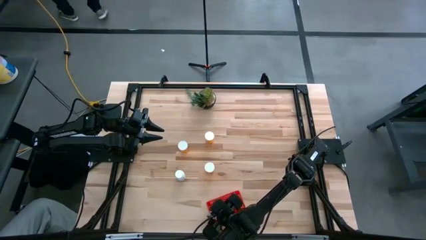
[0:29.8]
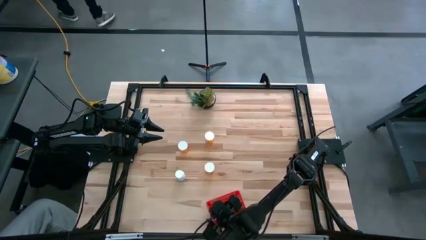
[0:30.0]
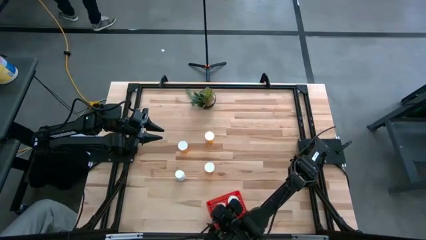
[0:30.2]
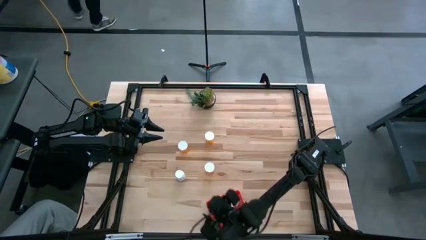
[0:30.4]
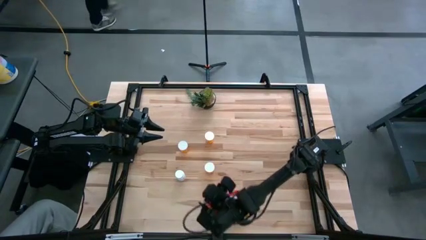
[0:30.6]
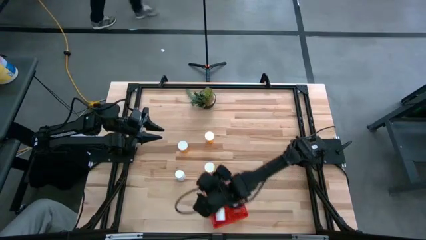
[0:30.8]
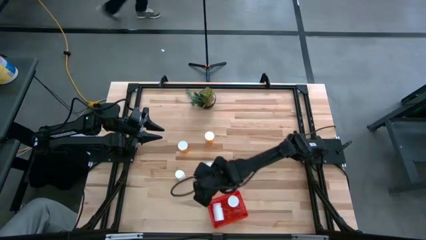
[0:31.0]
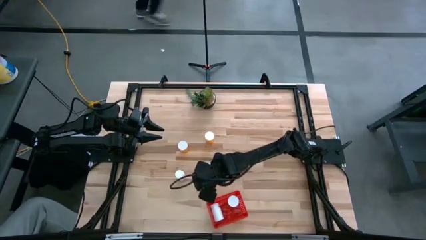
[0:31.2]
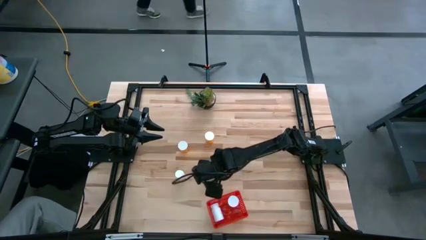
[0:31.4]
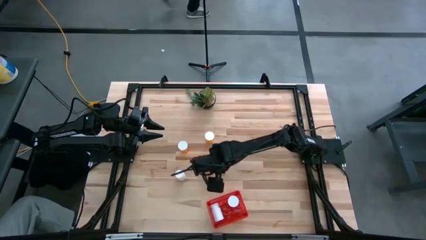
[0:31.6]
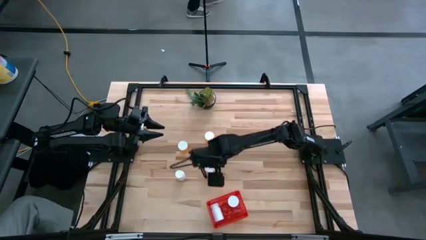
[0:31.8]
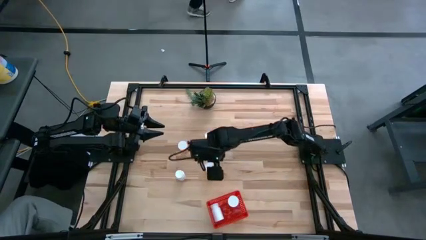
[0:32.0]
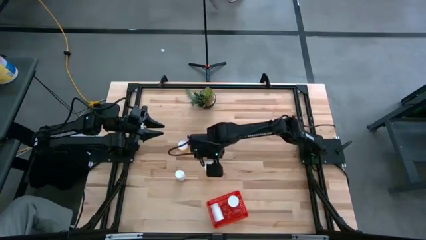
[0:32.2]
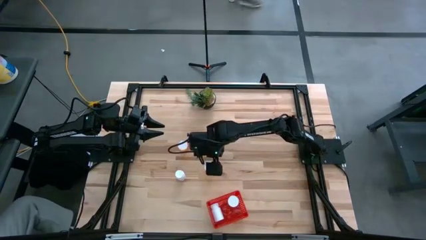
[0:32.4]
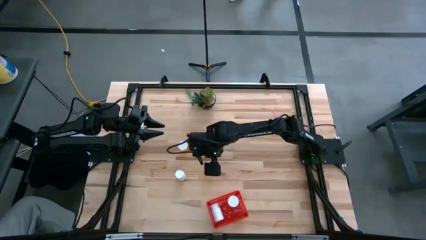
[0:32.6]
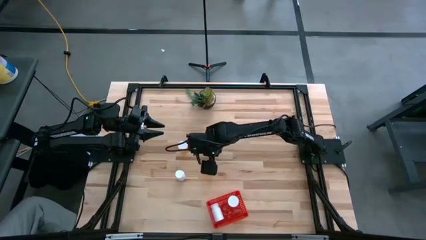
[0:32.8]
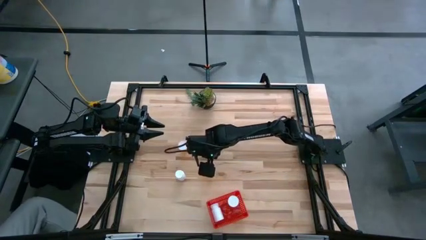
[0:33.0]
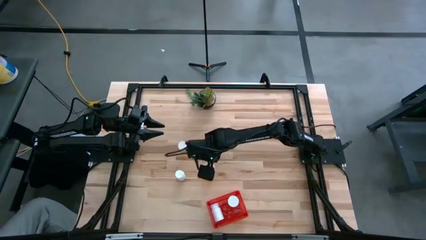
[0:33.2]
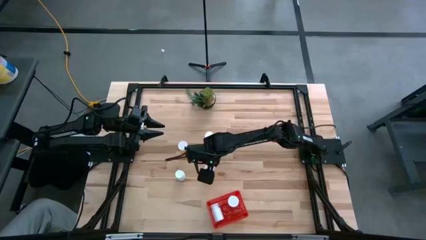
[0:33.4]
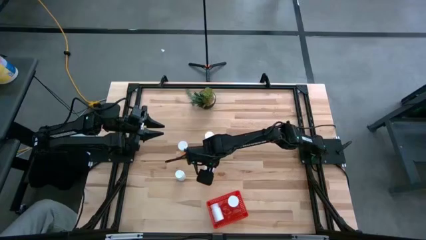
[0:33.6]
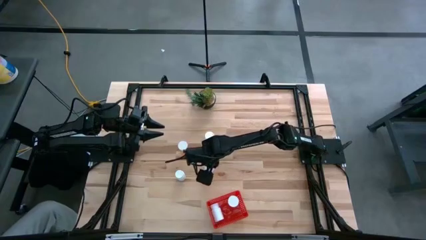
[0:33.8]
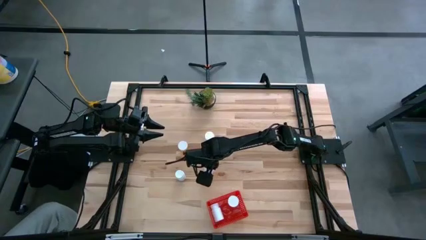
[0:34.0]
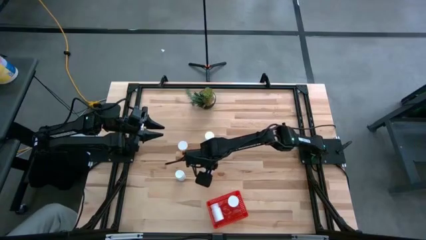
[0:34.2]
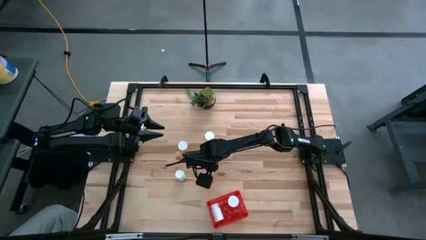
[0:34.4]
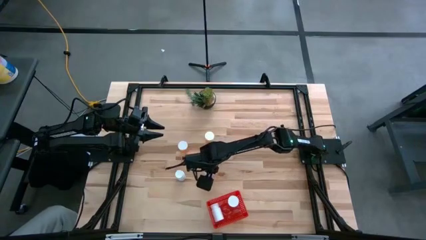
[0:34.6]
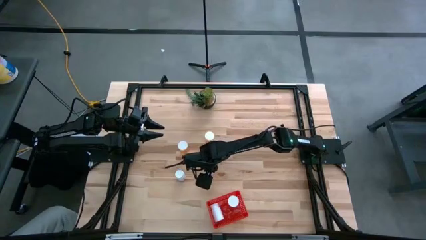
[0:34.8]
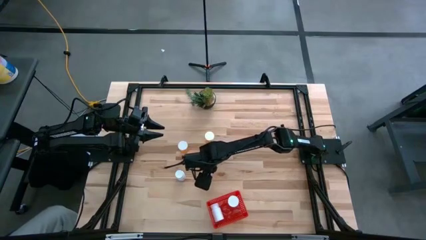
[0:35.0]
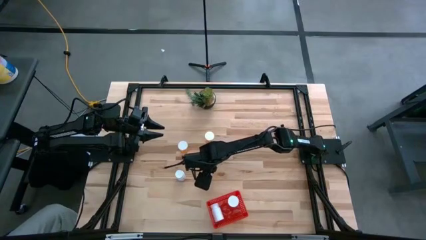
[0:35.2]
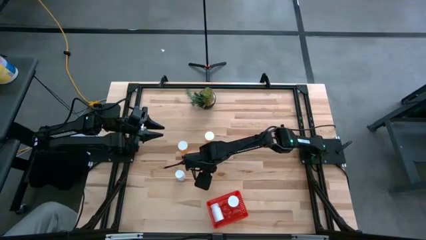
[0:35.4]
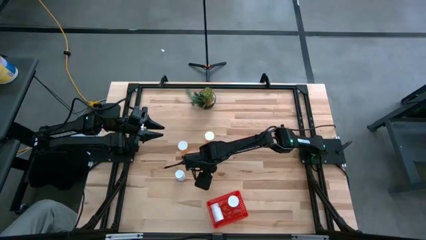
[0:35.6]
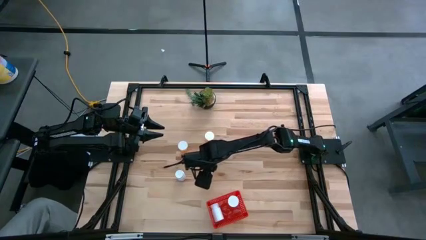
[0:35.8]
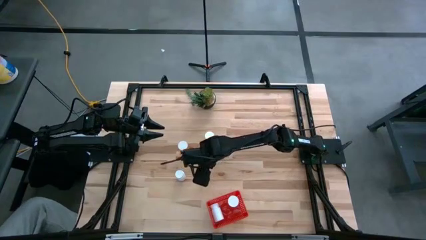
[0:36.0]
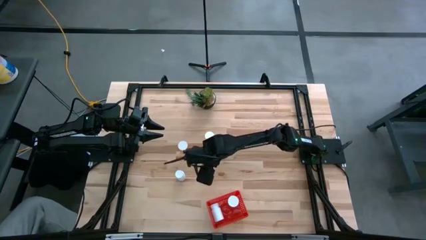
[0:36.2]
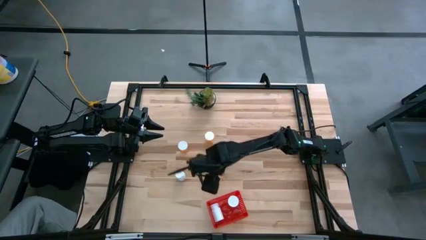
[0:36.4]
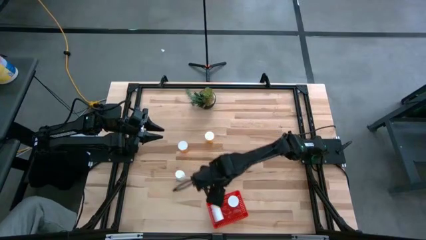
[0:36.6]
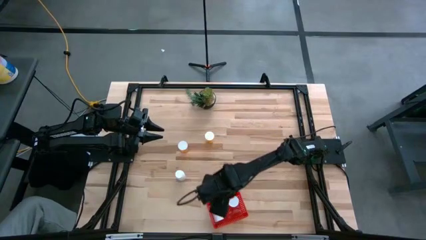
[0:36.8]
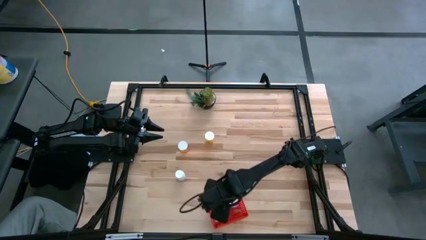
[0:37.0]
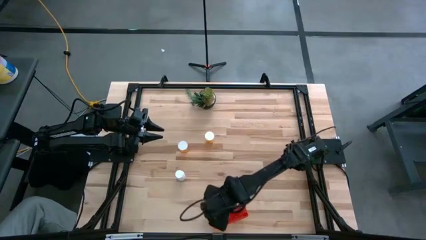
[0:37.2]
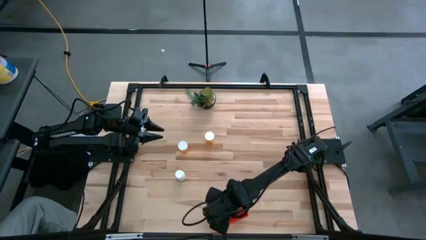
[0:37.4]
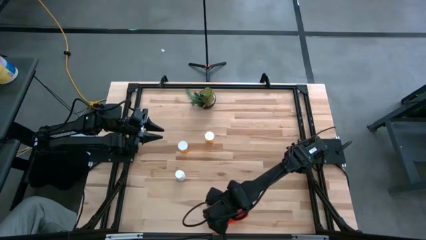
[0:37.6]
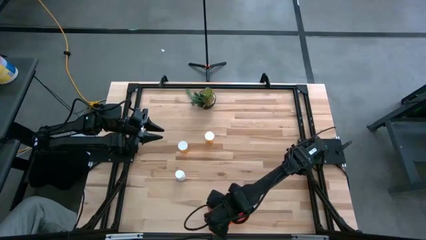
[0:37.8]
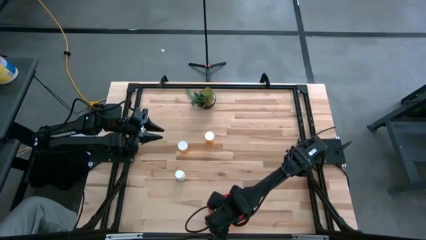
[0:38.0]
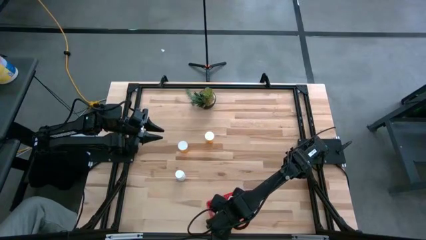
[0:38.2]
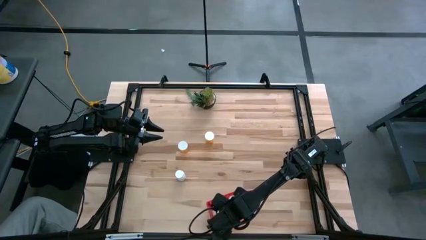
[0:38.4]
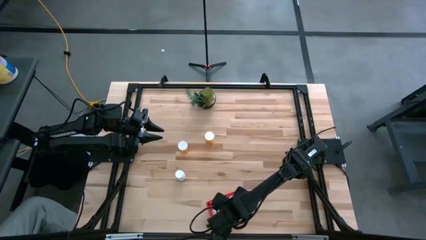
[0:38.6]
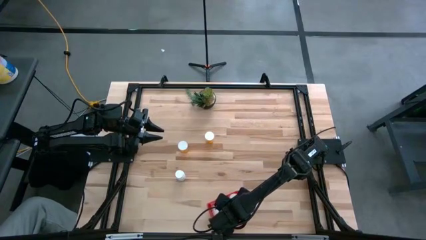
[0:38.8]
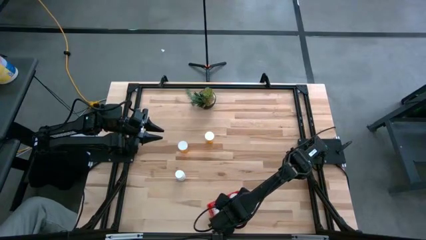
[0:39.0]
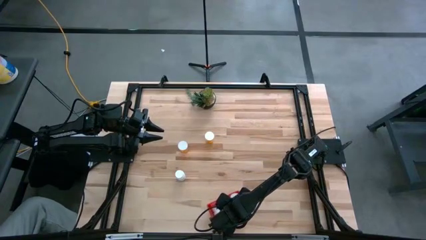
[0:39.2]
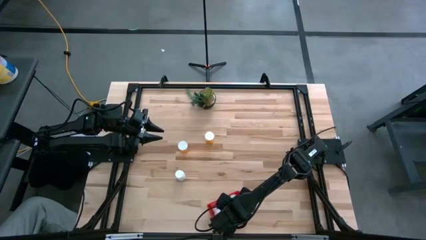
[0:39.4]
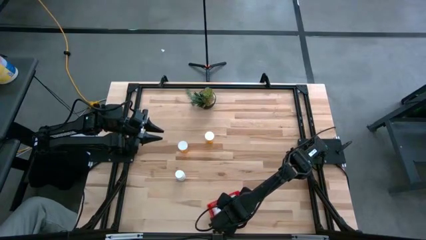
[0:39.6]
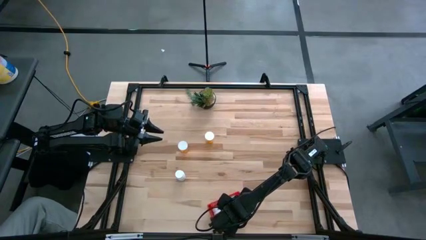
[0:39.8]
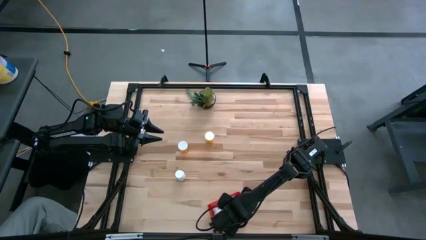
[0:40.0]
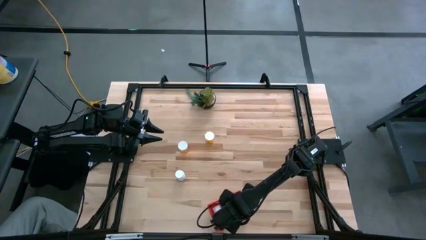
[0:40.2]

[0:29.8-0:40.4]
Task: Pick and place pill bottles into a basket
Put the orange pill bottle into the red bin

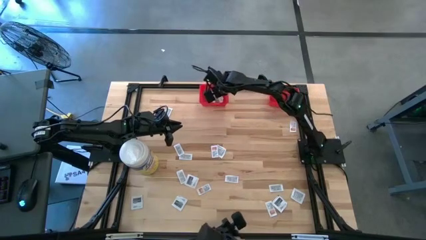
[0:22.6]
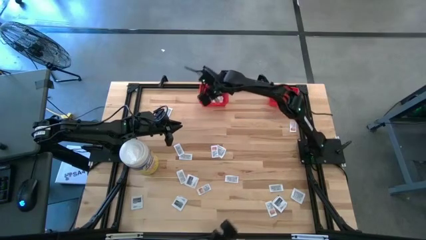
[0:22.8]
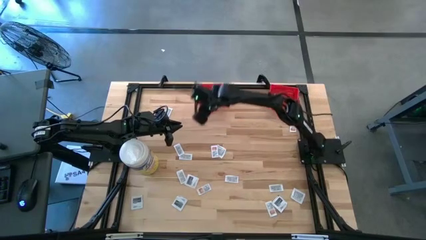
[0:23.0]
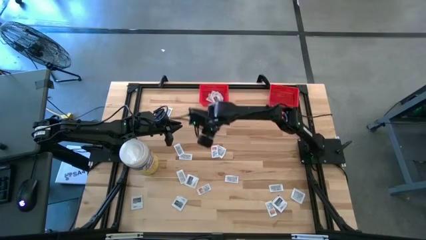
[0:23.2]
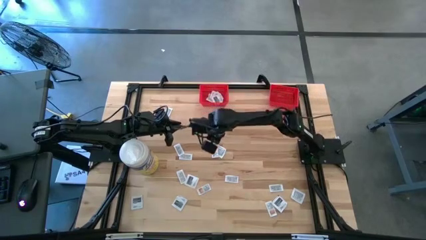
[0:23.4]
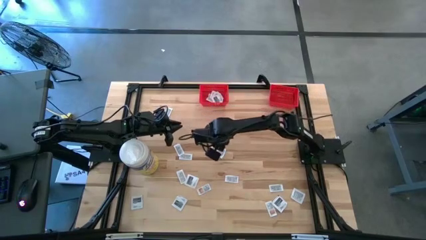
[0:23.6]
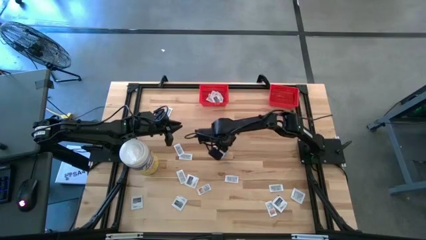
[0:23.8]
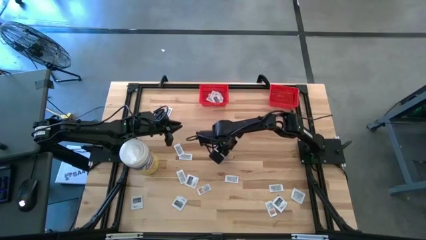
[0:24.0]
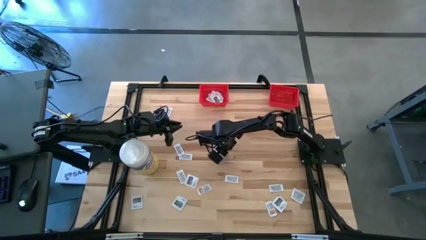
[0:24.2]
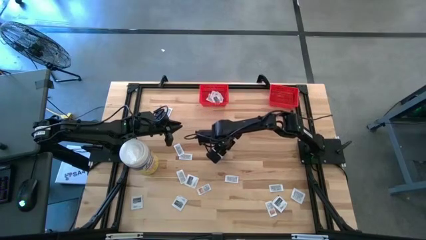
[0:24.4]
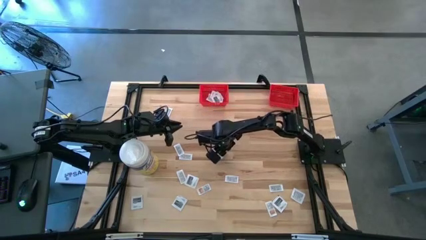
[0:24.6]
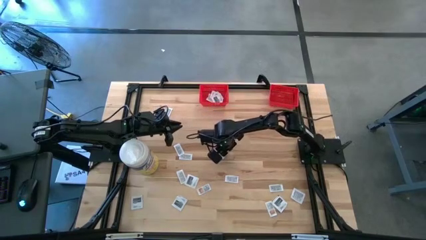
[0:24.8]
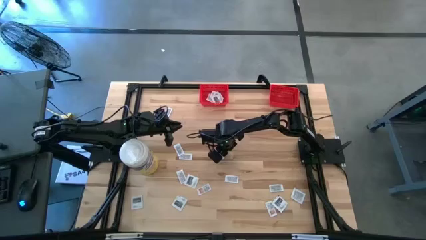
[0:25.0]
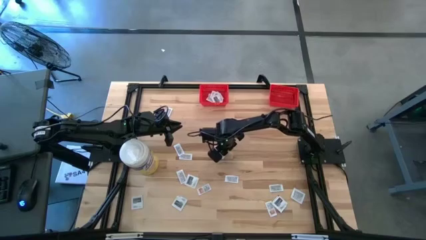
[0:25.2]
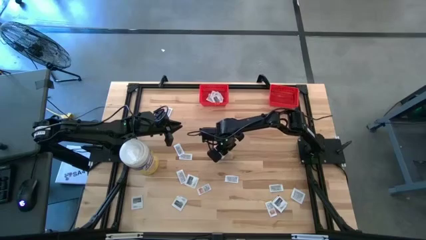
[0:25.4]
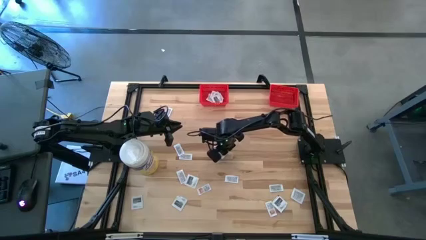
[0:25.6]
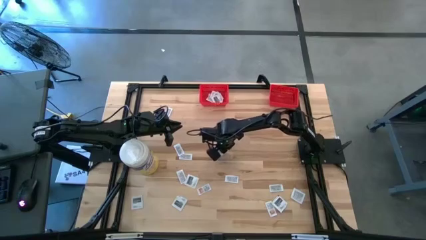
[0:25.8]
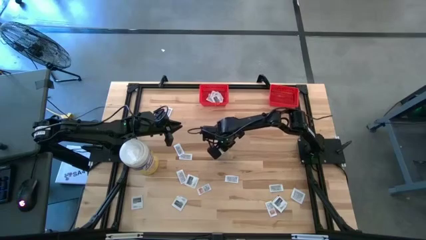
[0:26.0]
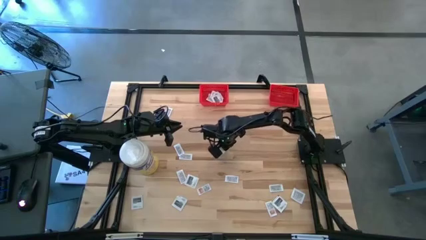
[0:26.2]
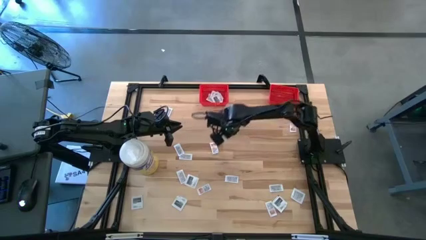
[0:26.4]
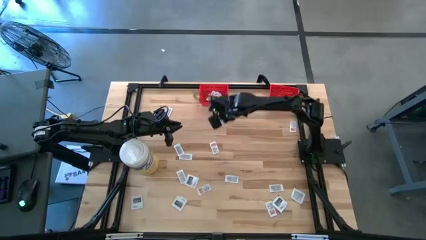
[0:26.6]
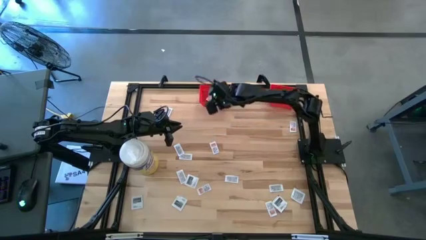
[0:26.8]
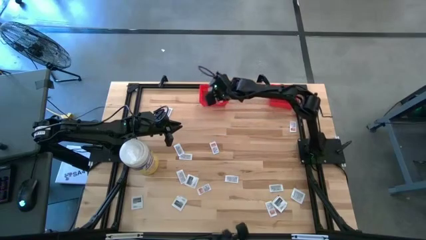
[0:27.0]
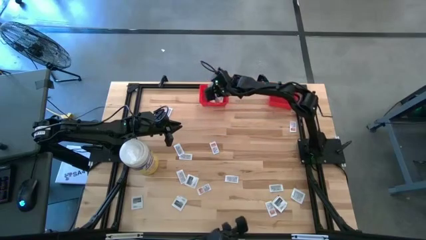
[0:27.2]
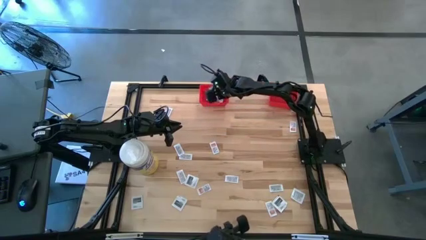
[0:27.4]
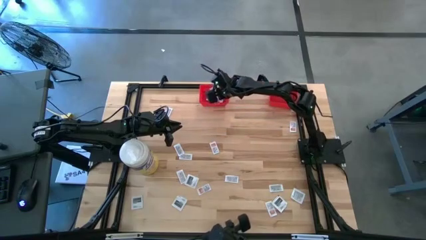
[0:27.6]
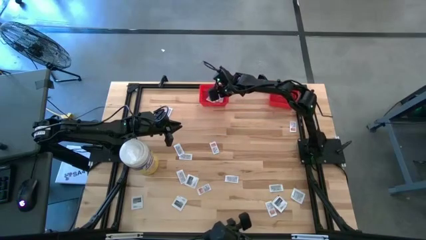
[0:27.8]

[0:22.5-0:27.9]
Task: Pick & Place First Aid Supplies
Put the towelette pack into the left red bin

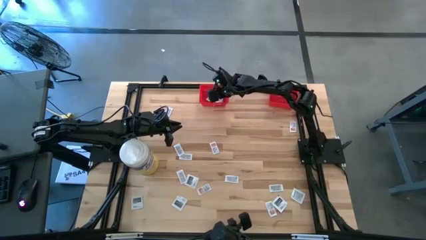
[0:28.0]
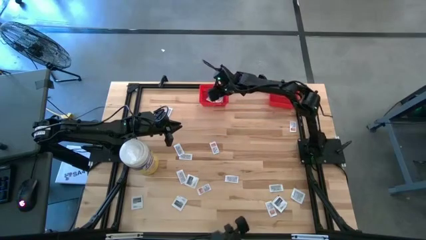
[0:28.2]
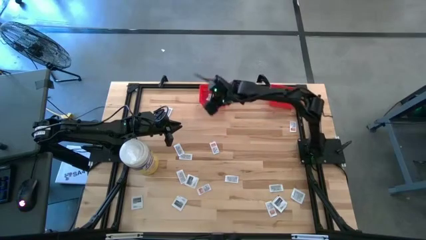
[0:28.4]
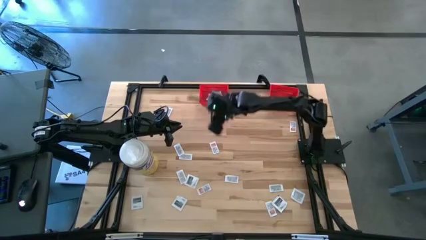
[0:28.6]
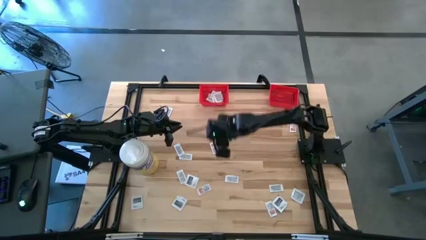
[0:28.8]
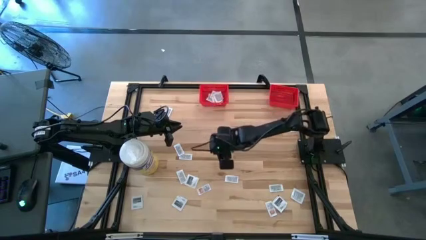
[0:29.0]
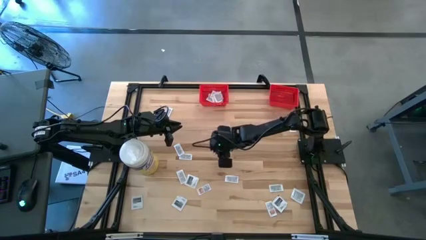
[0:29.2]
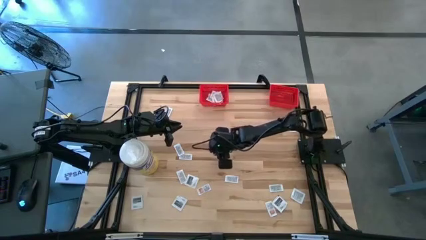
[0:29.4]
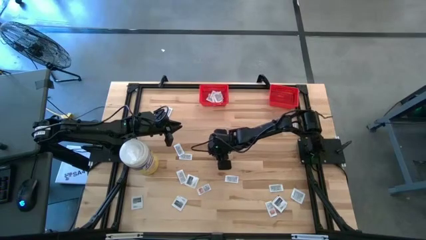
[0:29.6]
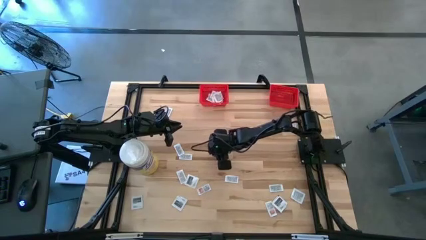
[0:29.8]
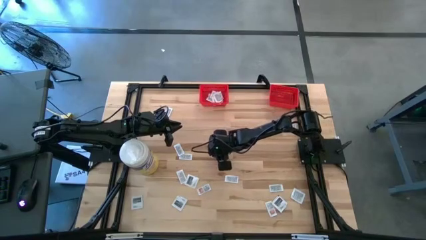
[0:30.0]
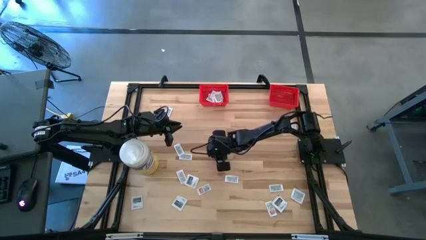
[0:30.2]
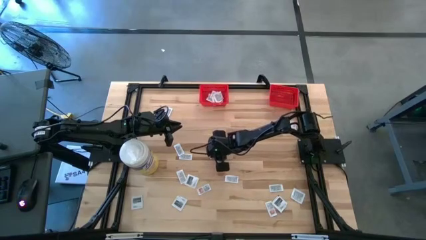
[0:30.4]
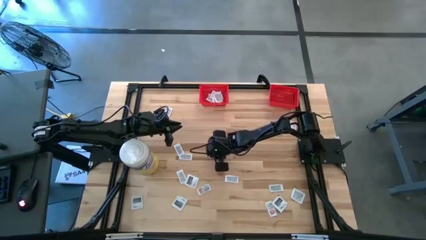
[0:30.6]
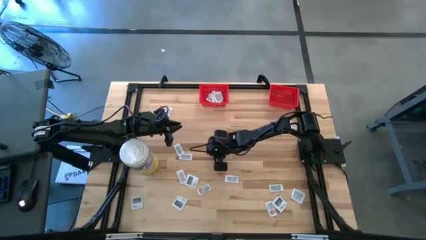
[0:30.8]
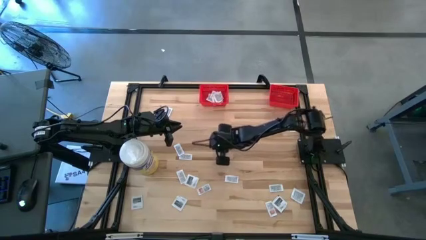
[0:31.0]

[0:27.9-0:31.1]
Put the ointment pack into the right red bin
